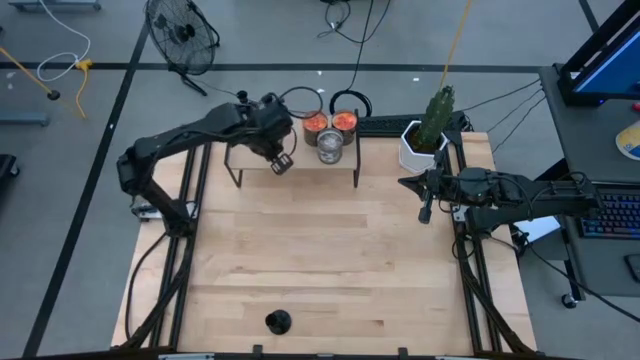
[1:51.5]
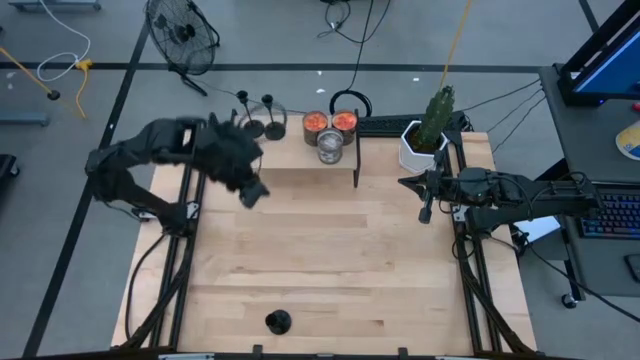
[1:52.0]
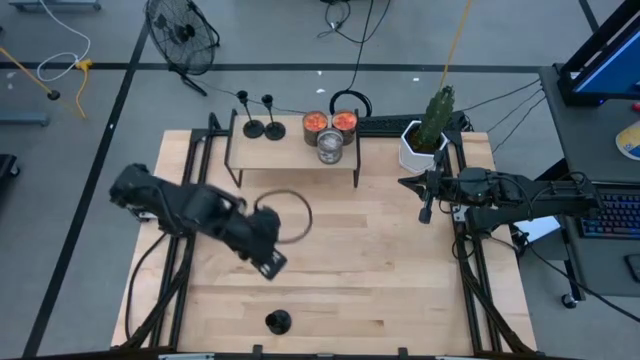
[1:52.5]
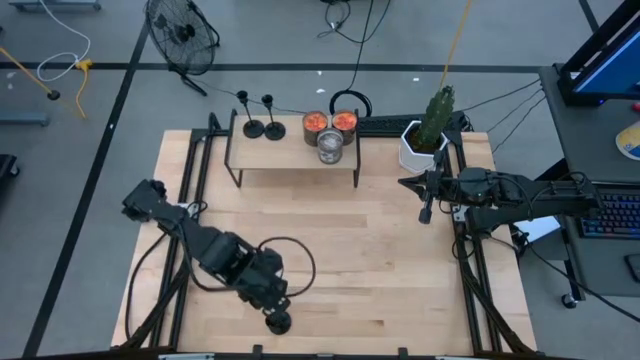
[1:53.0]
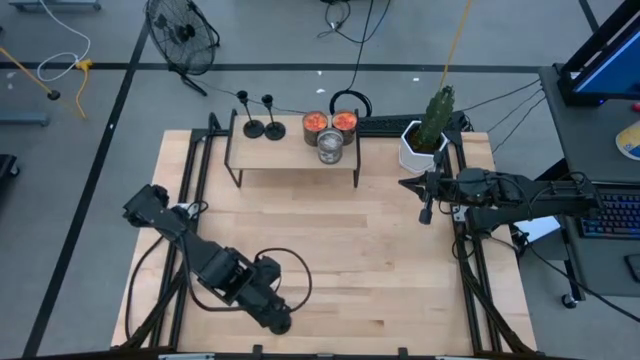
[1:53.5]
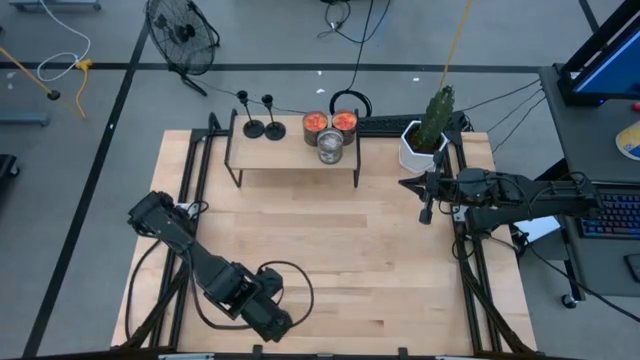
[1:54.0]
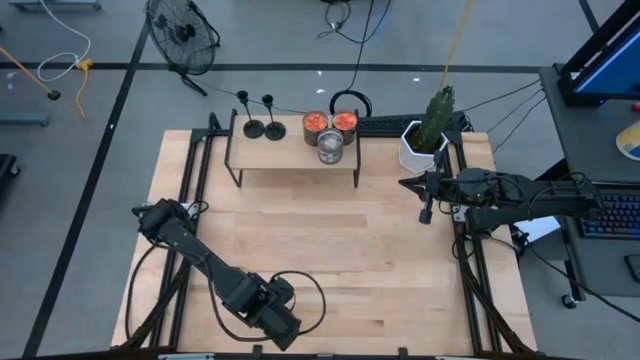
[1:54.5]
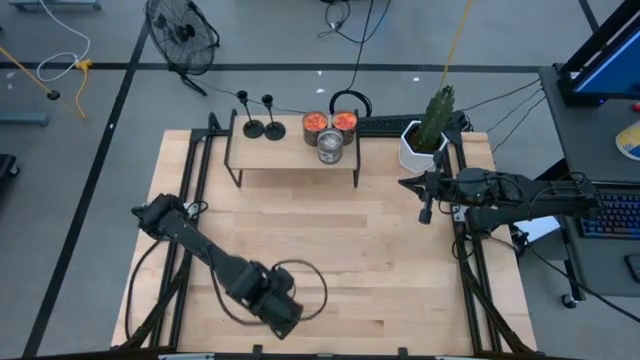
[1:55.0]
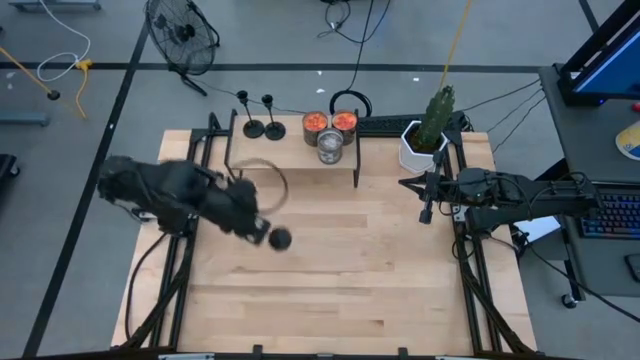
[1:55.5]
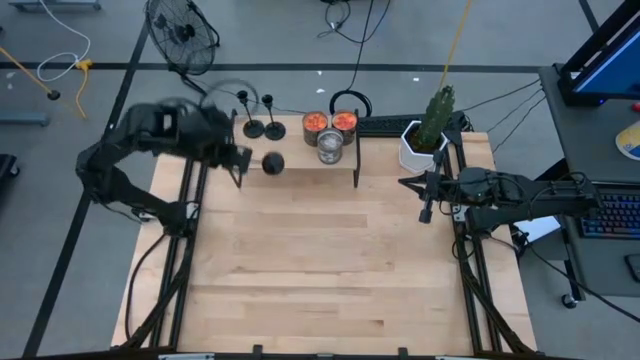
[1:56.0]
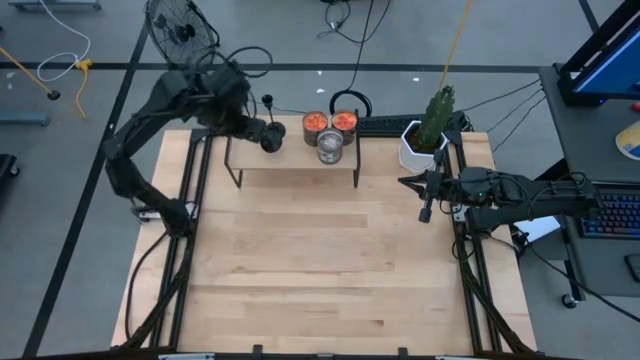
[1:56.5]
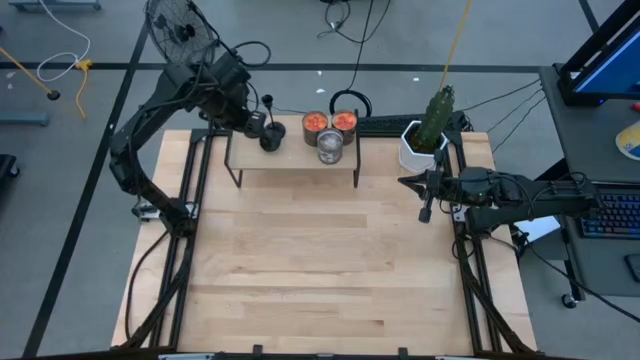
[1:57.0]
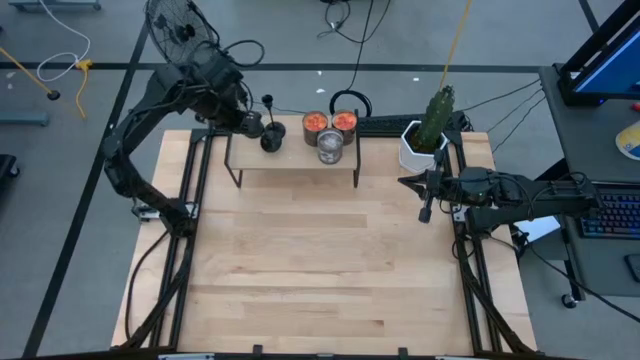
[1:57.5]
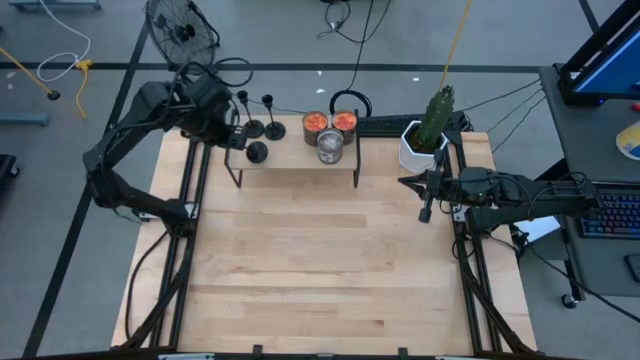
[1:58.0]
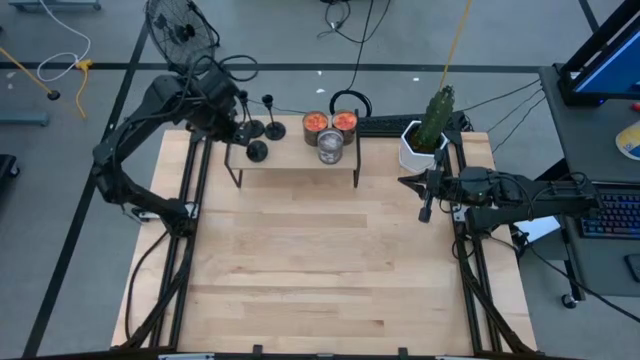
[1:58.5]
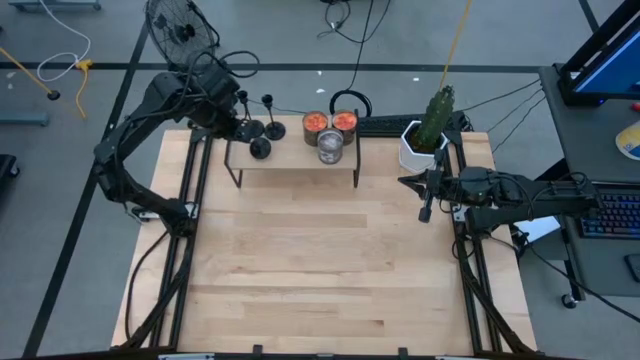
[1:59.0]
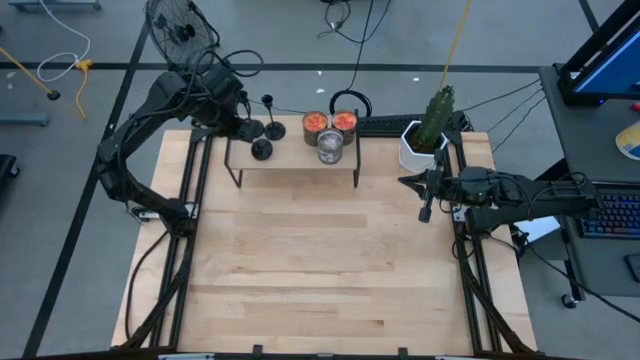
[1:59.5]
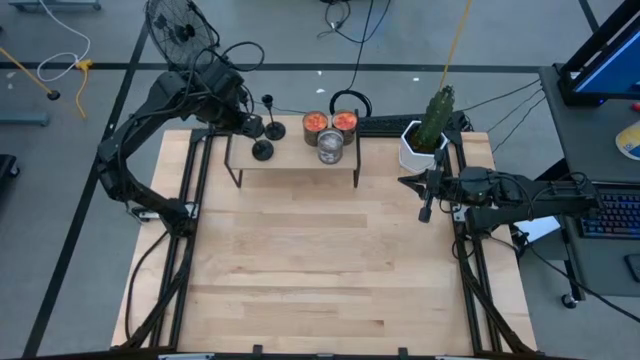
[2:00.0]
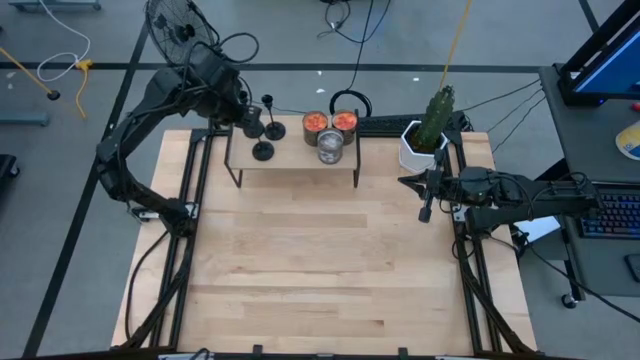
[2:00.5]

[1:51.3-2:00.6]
Task: Pick & Place candle stick holders
Put the black candle holder on the shelf

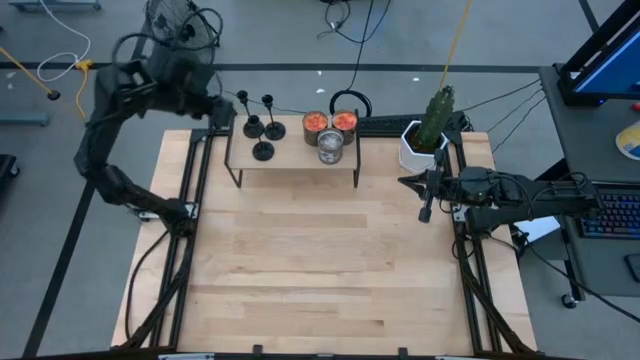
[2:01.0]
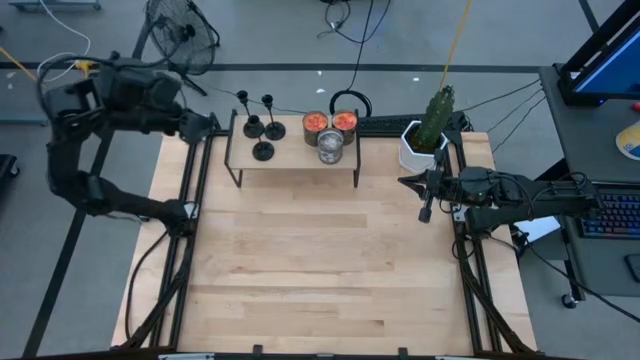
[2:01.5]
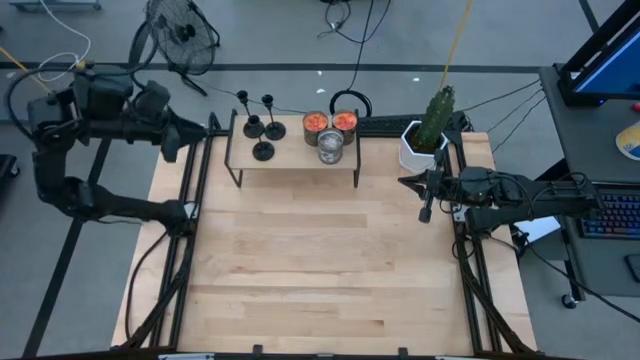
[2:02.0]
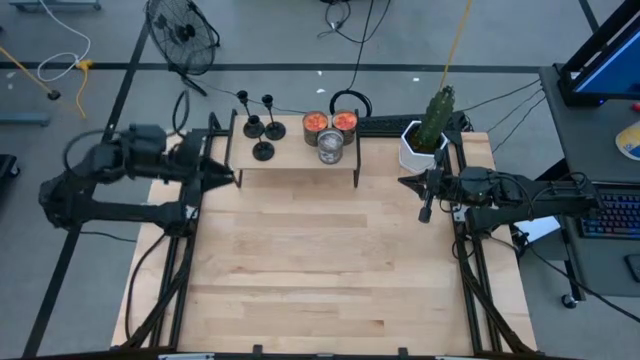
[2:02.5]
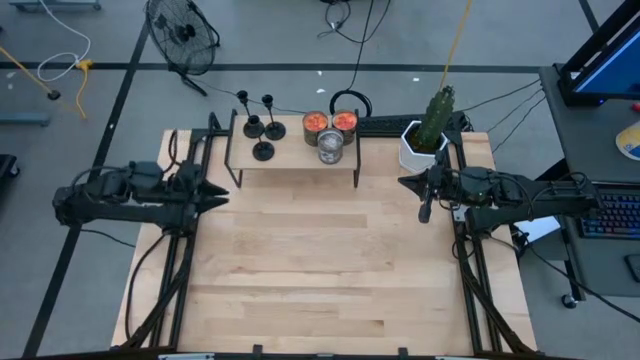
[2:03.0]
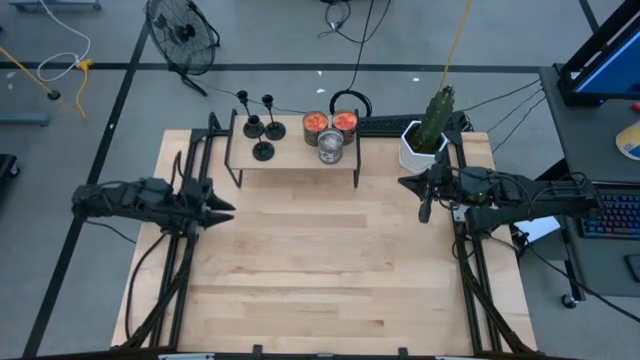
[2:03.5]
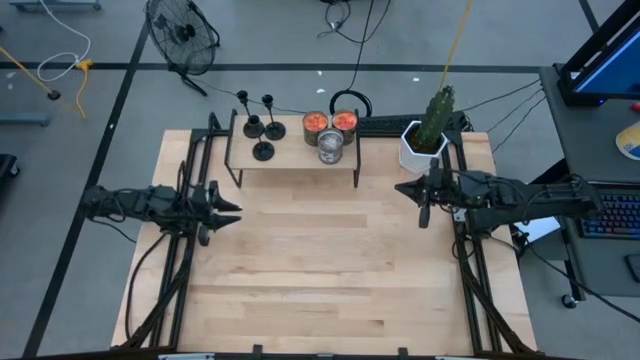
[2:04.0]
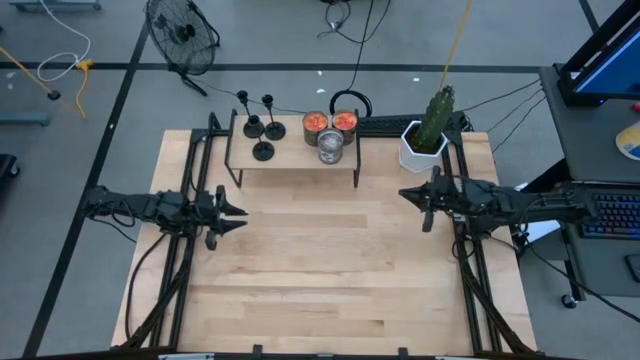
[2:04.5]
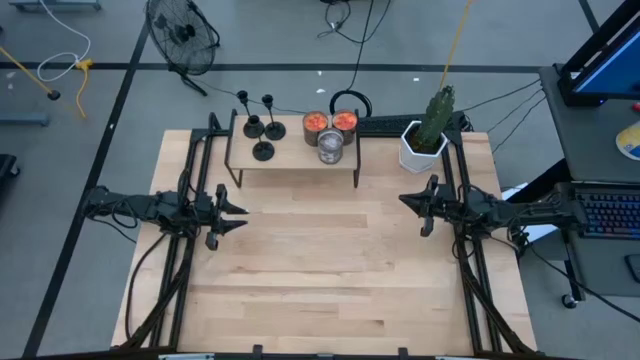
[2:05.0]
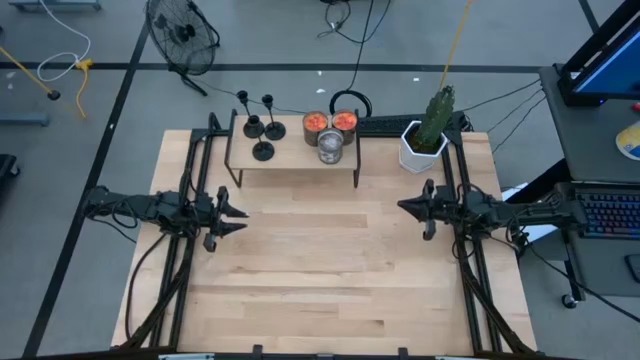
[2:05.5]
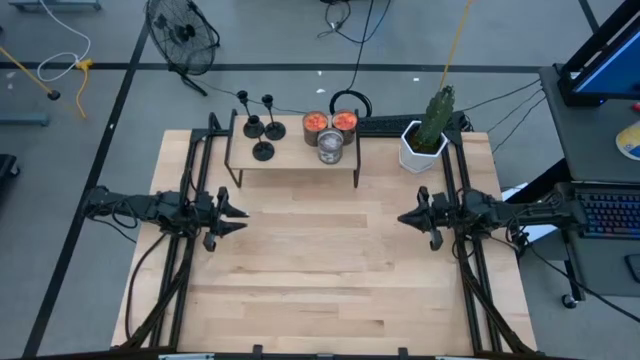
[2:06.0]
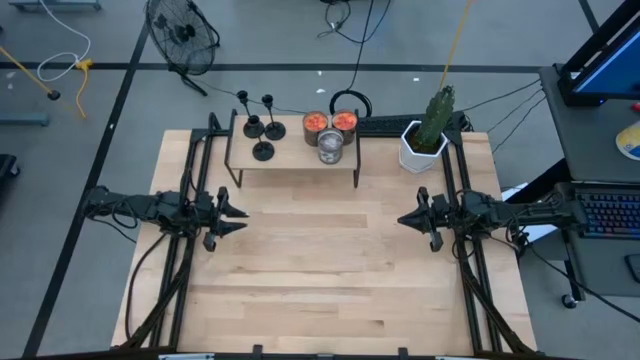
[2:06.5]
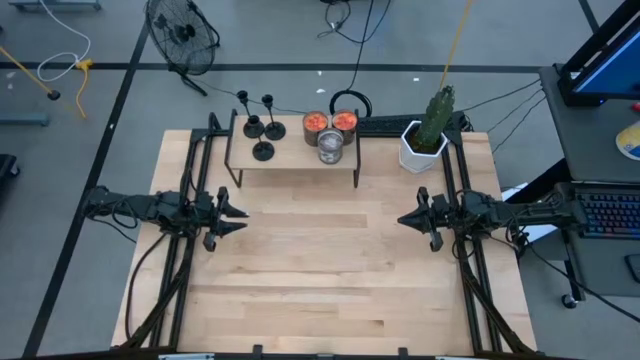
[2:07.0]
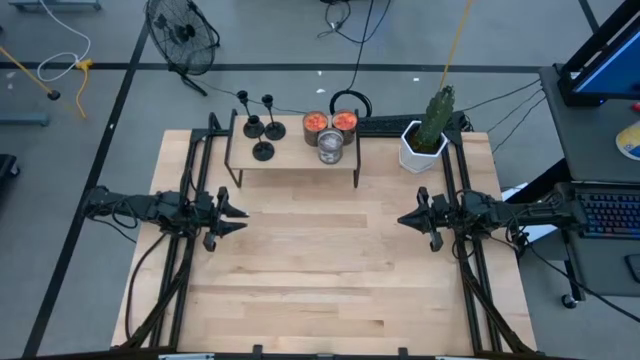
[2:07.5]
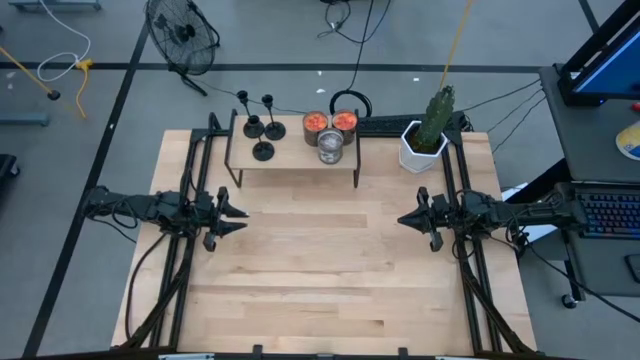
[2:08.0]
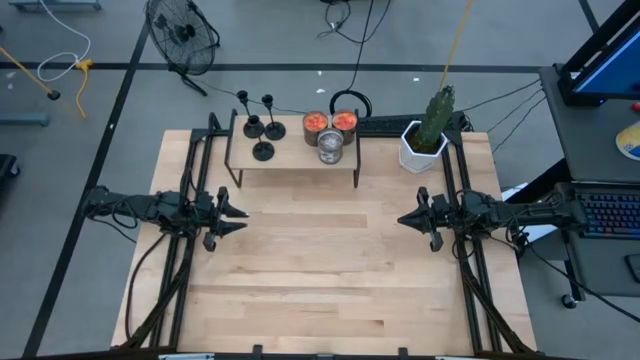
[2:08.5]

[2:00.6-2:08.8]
Return to Home Position

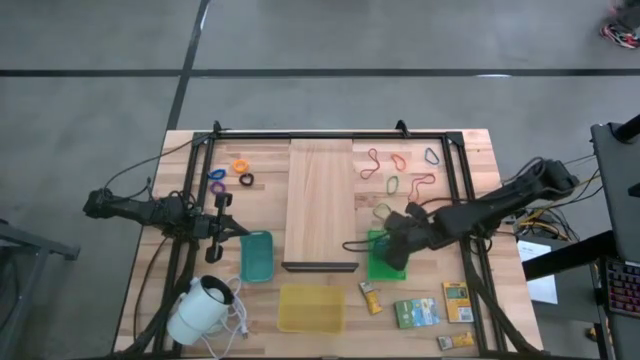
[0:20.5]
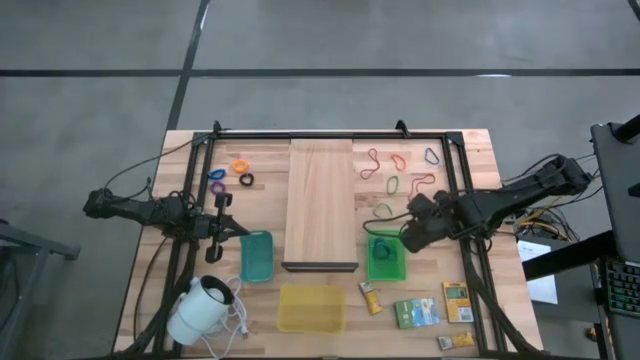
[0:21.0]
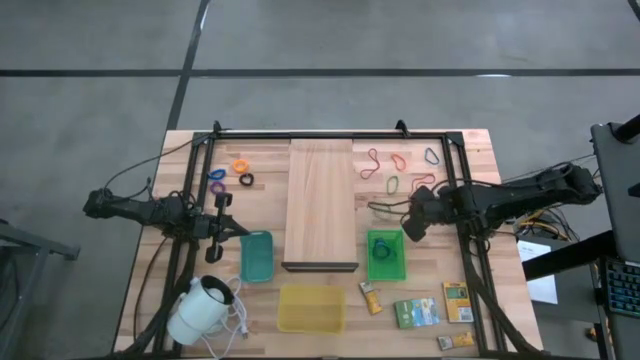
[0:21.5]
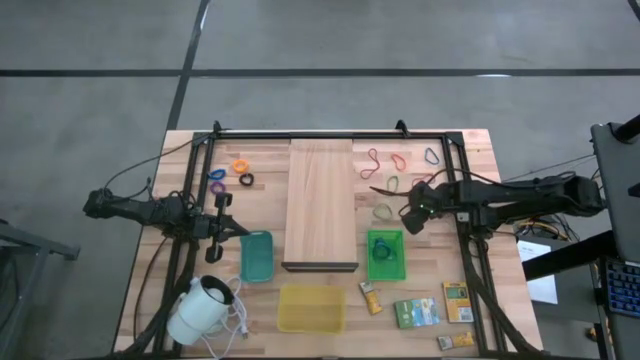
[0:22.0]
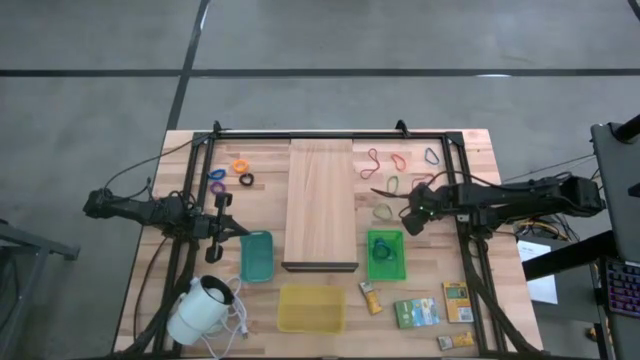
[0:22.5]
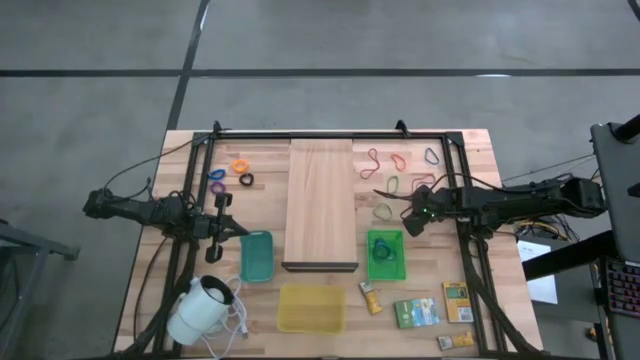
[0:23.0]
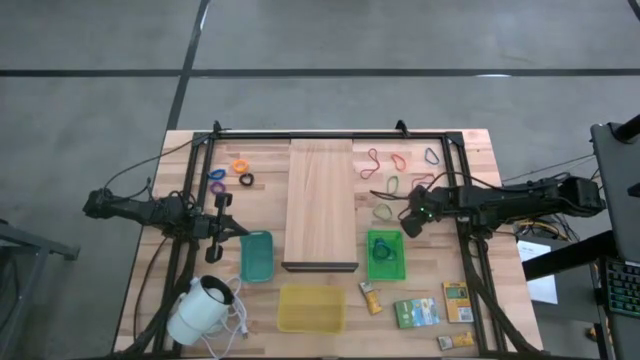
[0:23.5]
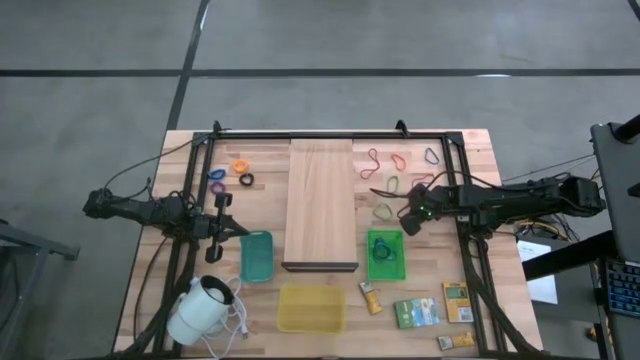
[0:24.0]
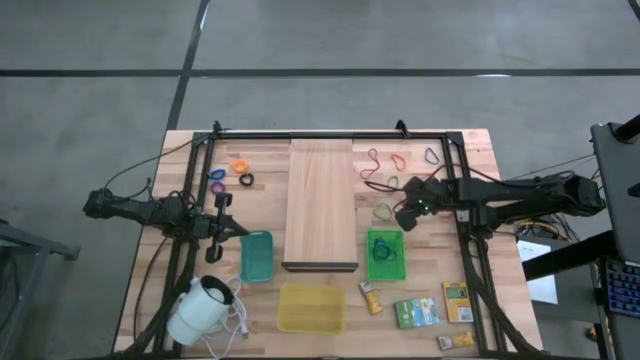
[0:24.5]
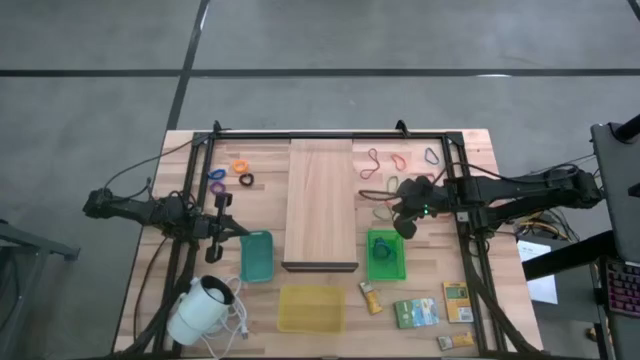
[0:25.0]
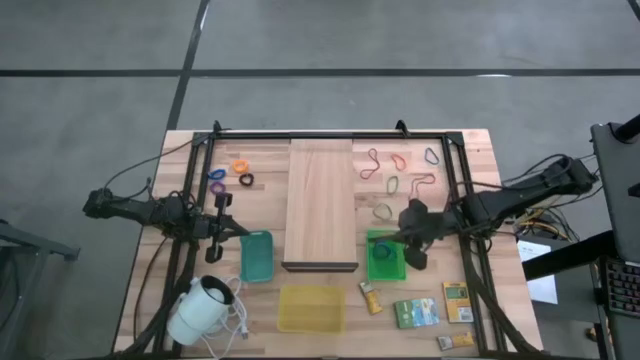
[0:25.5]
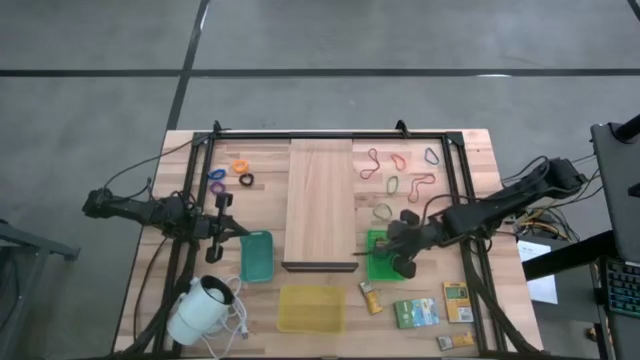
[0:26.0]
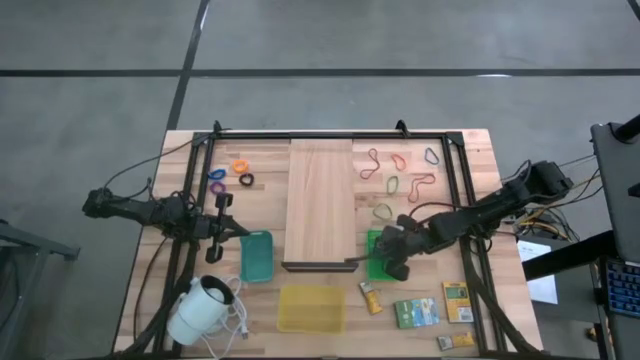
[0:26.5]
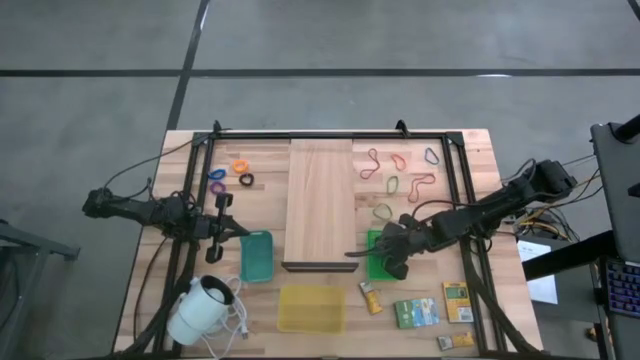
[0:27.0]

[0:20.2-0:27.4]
Task: Pick & Place Office Desk Supplies
Put the bottom left orange rubber band into the green bin
